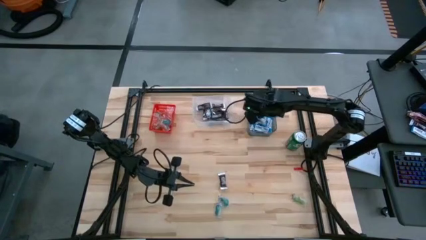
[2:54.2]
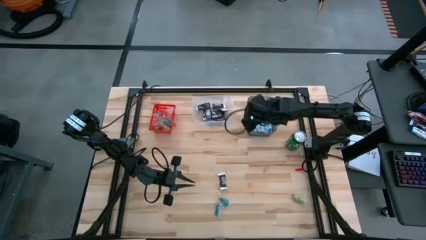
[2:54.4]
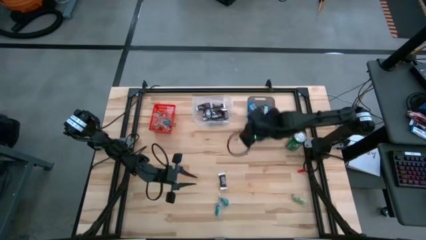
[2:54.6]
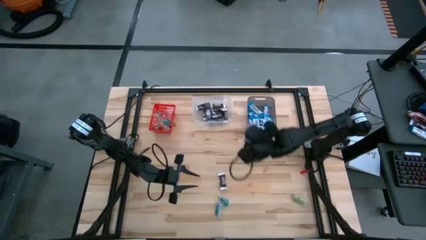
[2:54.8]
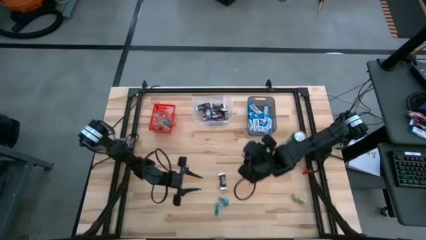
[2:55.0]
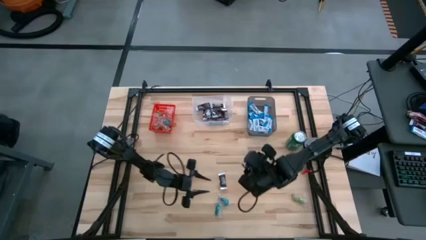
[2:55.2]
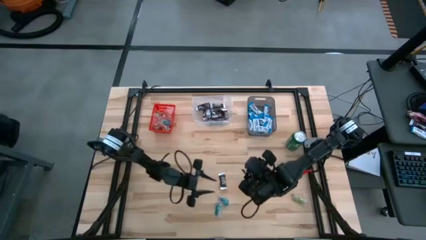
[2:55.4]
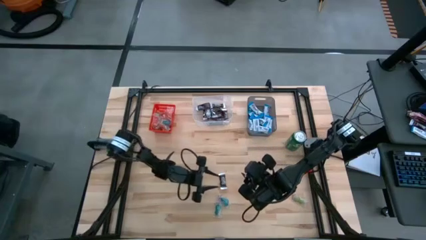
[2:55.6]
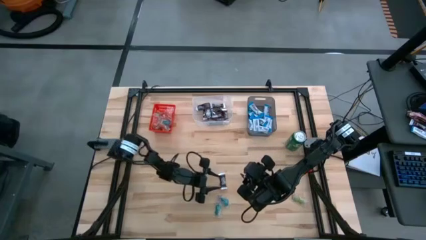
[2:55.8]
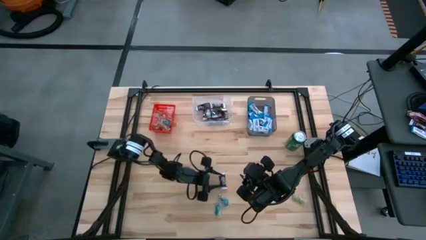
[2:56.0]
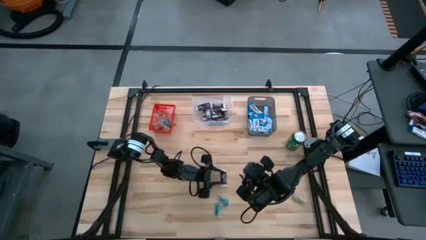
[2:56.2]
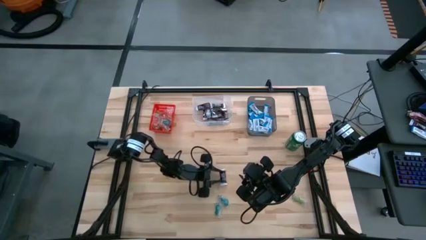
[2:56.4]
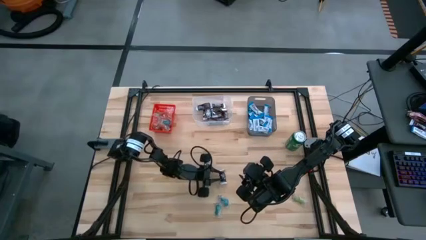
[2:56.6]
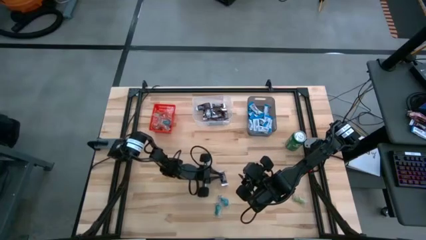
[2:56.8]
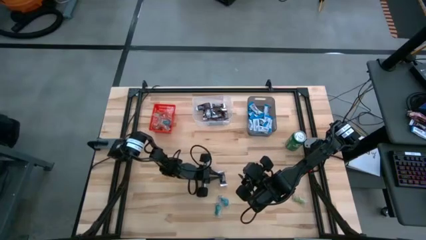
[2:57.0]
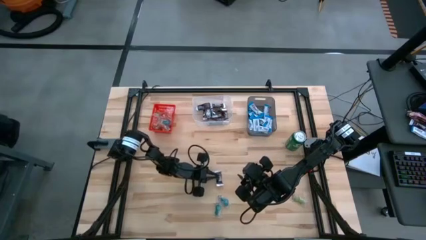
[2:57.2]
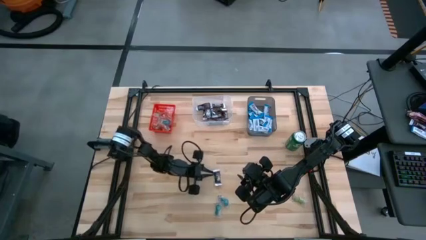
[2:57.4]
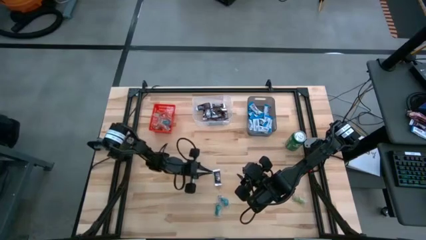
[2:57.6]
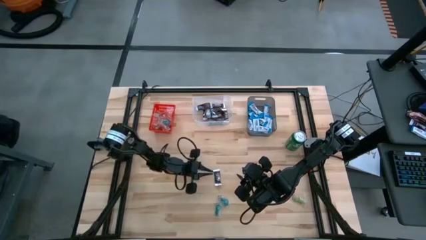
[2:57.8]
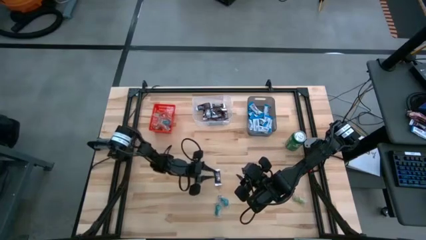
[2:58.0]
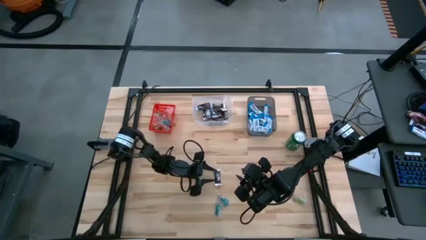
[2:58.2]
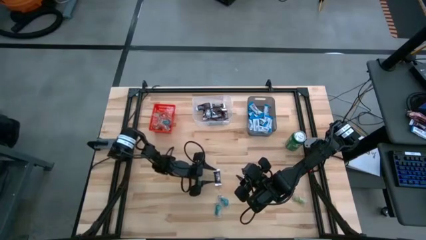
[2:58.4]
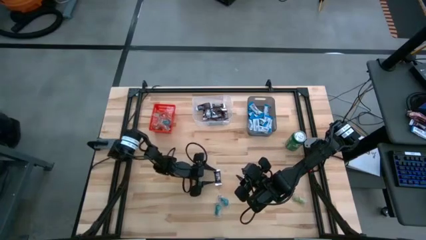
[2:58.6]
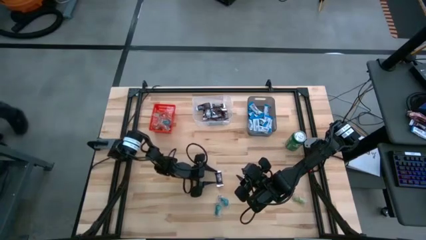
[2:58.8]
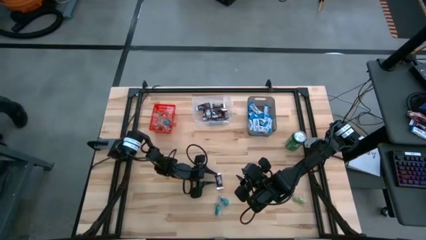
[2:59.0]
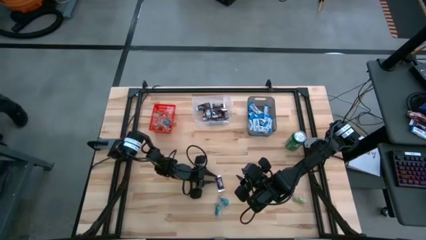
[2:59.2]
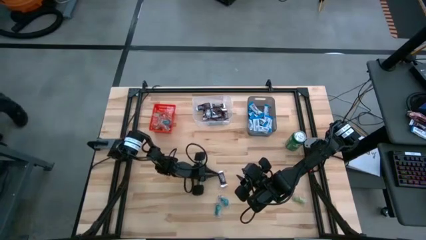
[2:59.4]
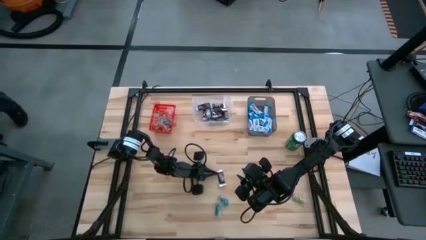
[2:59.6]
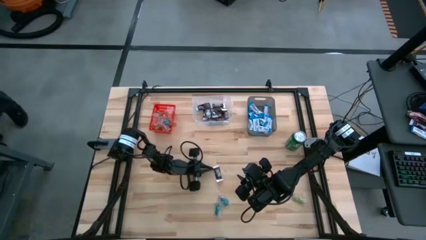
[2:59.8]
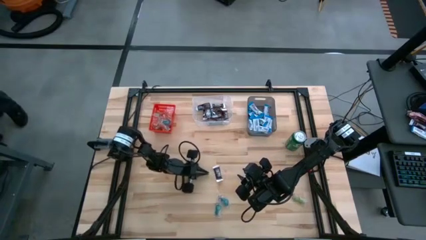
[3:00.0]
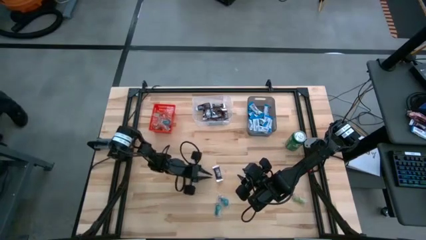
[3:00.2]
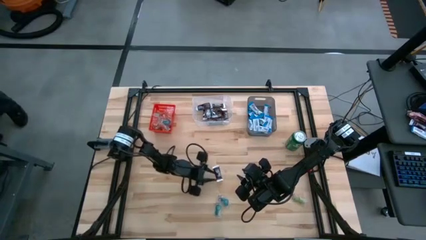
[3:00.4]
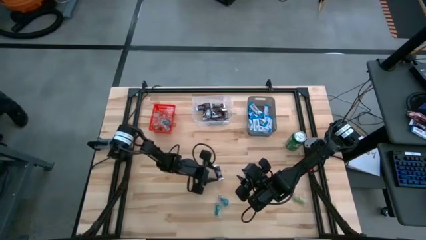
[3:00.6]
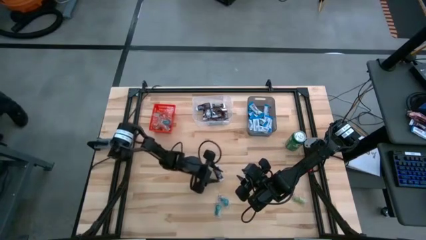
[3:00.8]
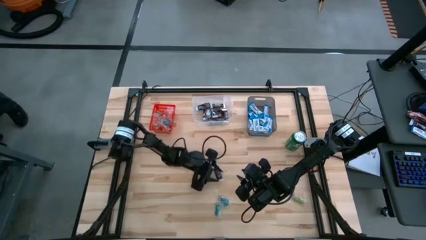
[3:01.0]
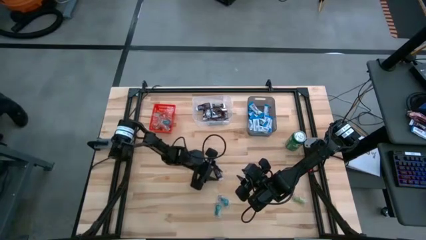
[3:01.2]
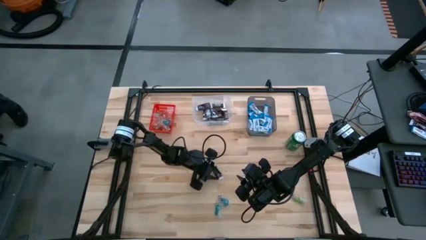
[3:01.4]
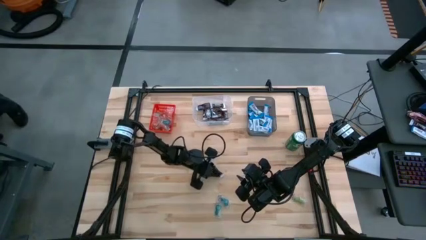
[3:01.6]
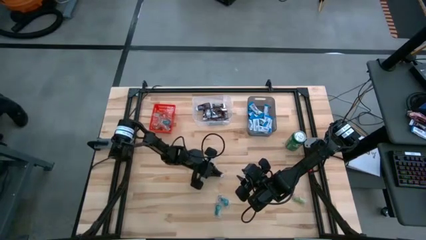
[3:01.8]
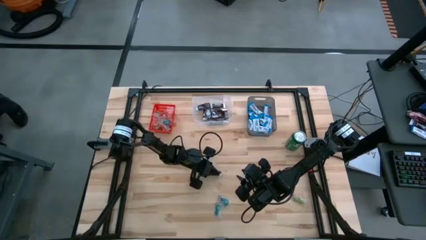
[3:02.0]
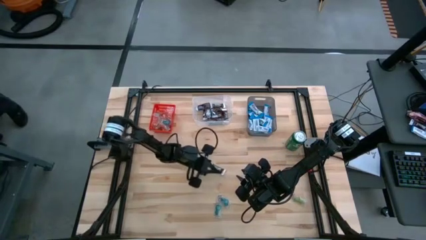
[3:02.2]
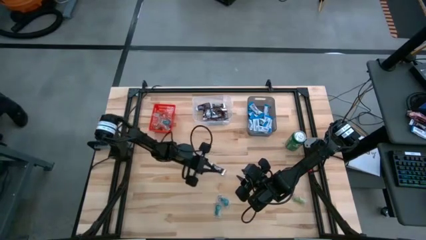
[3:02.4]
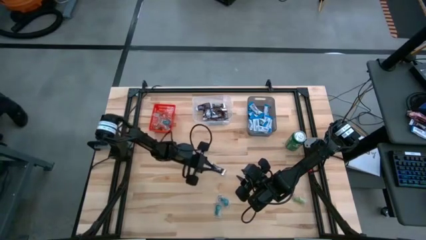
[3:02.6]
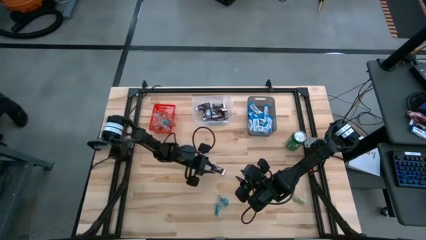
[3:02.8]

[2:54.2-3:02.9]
Task: Sort candy
Put the black chocolate bar into the transparent bin

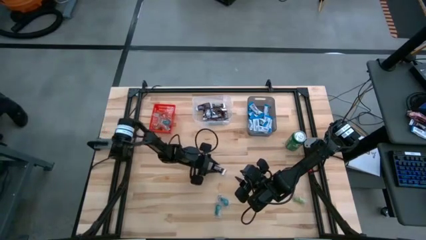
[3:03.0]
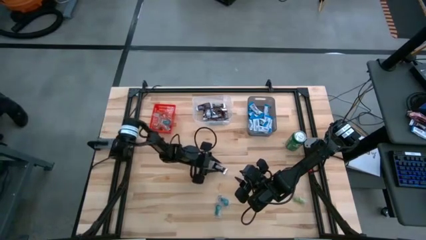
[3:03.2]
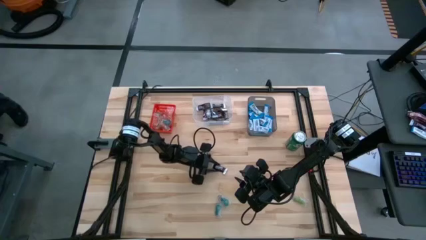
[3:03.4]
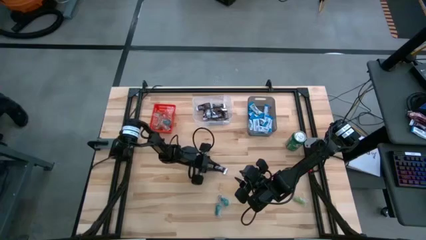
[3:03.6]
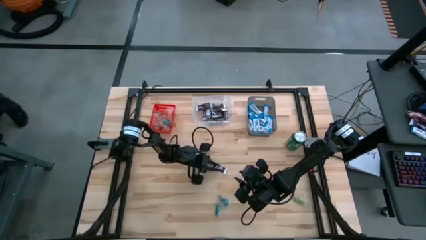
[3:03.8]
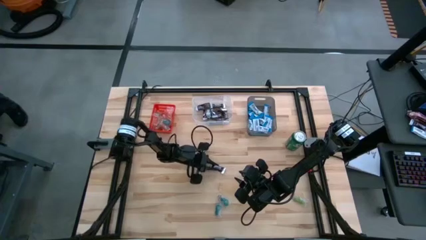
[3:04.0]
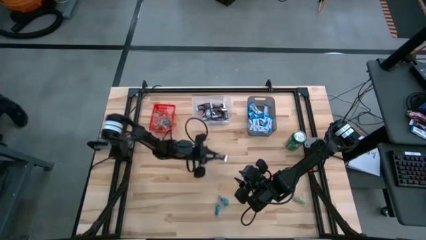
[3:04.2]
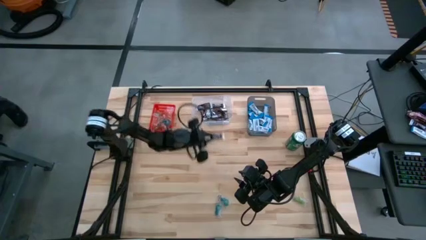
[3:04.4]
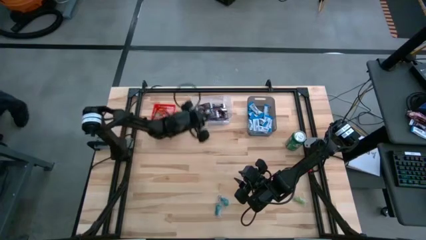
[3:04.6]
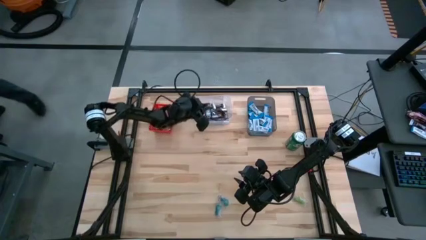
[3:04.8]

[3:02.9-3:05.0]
Put the black chocolate bar into the transparent bin

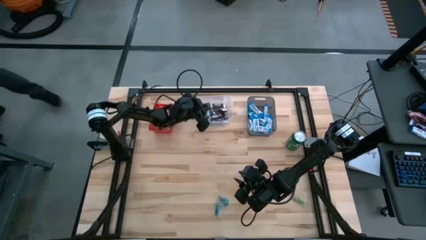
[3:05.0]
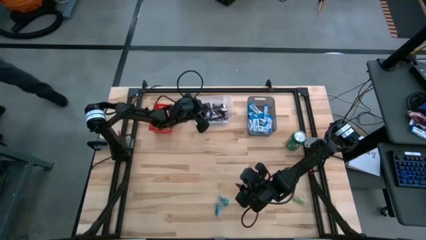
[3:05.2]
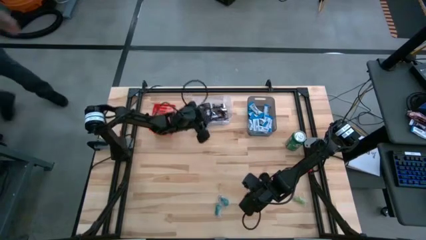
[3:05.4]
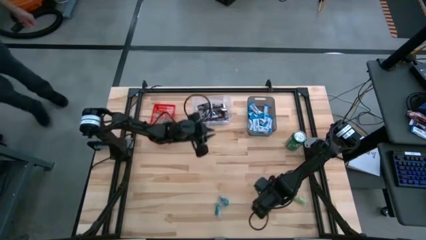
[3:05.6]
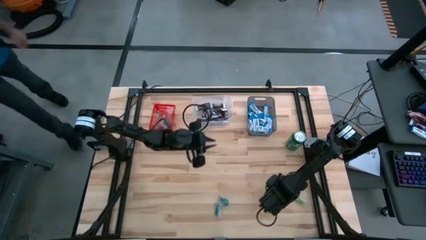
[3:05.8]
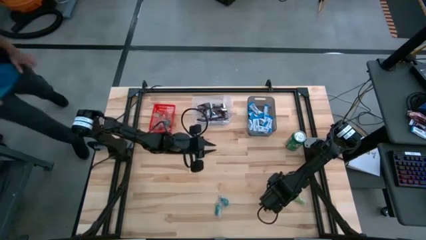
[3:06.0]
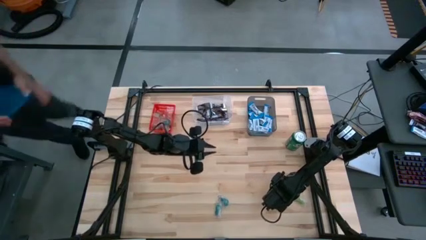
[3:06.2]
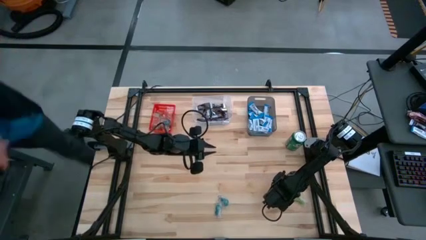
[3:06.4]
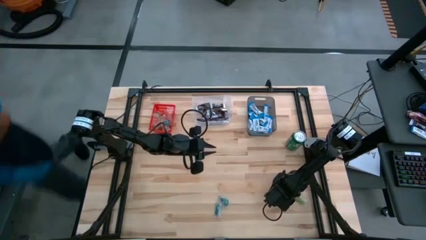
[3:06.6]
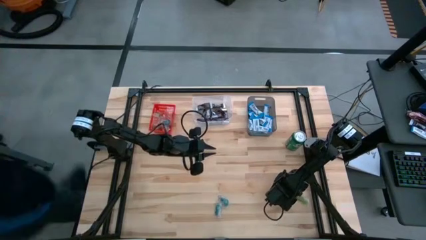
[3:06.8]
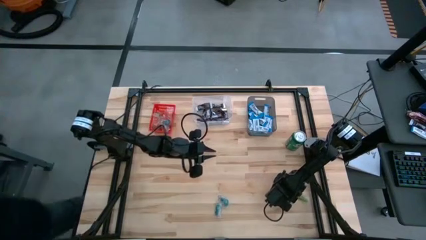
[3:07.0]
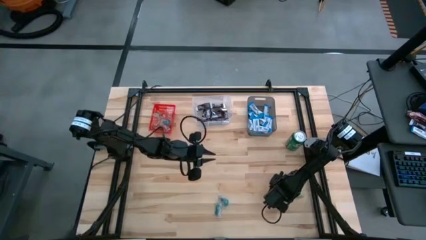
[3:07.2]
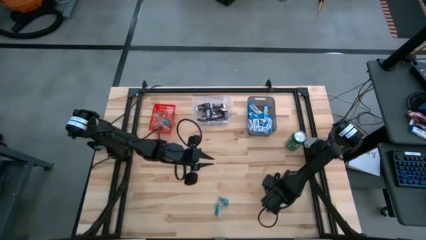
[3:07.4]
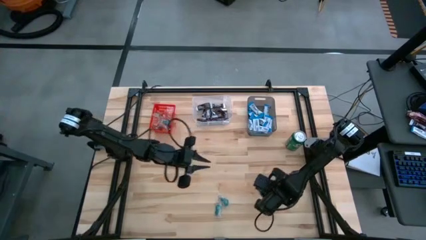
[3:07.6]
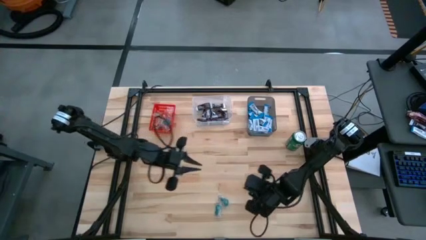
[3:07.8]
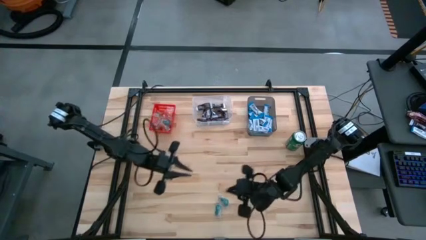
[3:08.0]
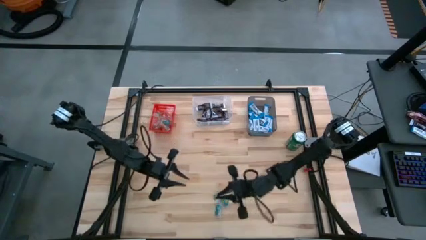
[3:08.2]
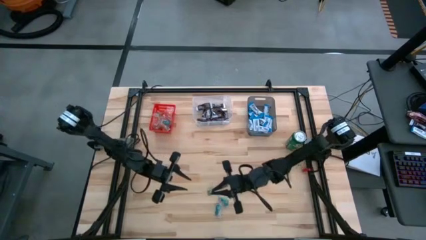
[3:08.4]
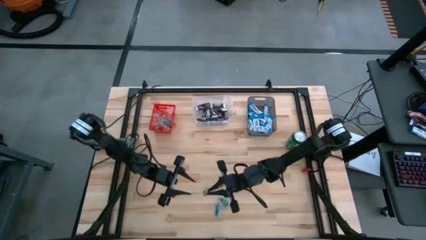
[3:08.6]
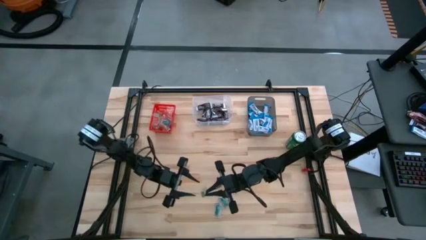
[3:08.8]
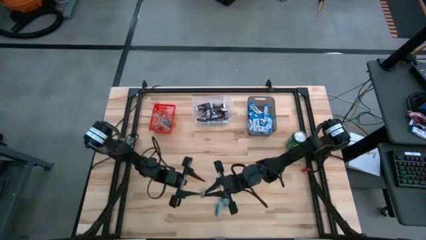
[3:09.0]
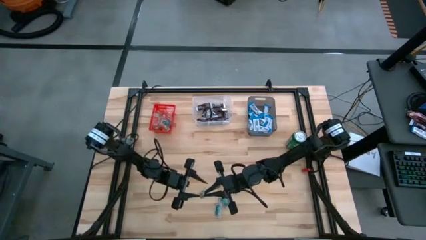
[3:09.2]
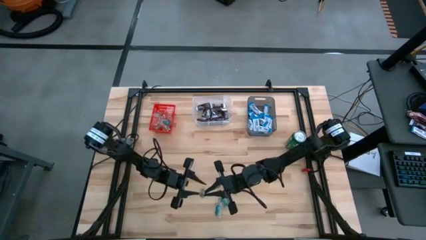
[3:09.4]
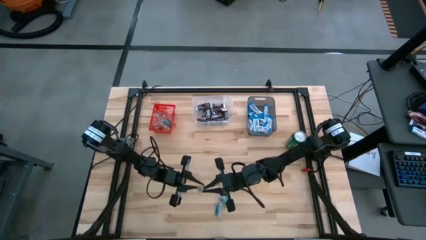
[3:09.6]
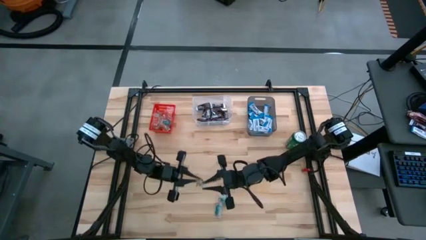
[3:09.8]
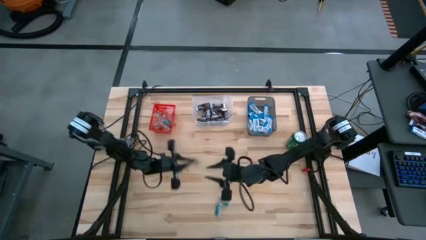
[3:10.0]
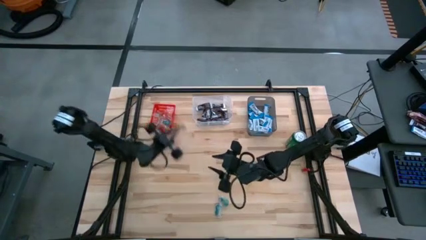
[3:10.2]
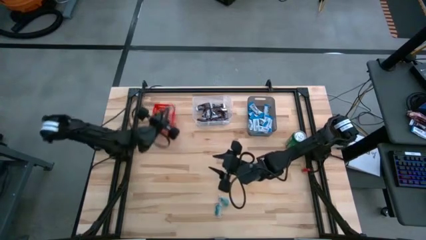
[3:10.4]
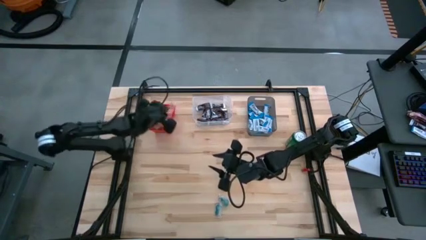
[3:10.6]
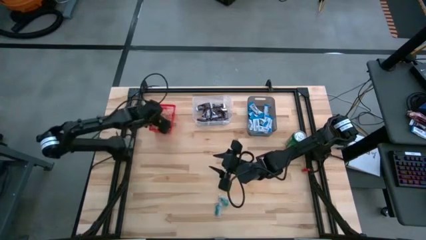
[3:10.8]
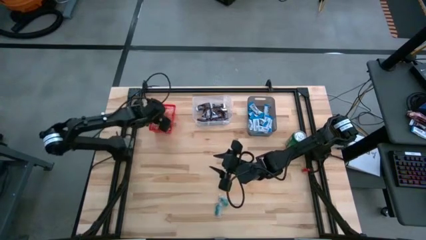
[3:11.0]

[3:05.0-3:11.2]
Put the green candy into the red bin
